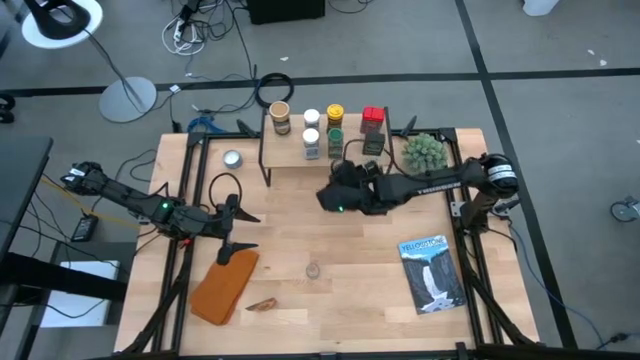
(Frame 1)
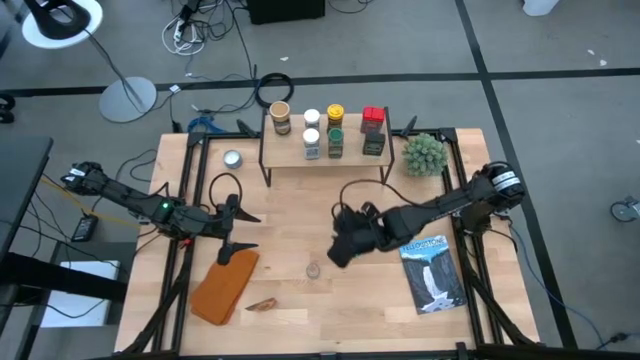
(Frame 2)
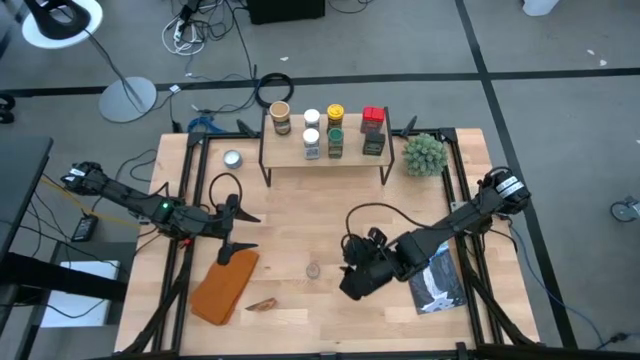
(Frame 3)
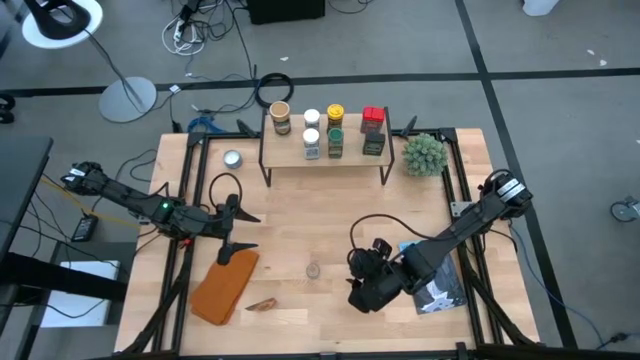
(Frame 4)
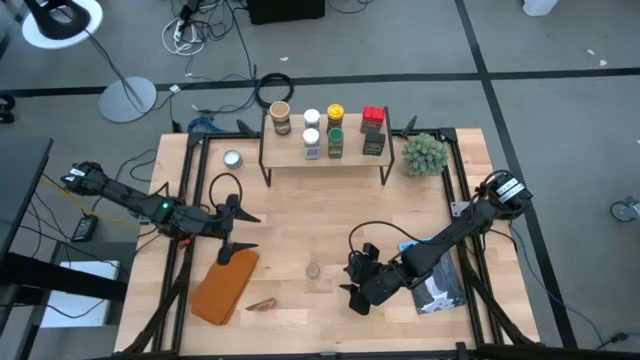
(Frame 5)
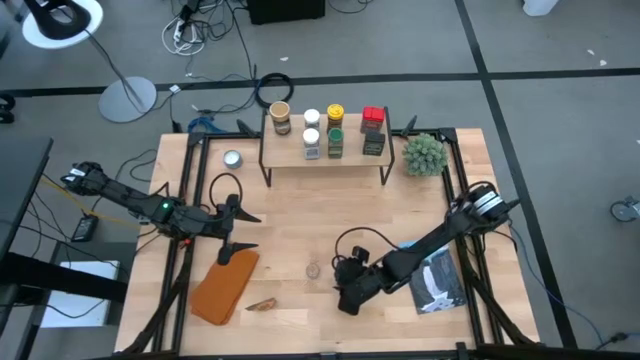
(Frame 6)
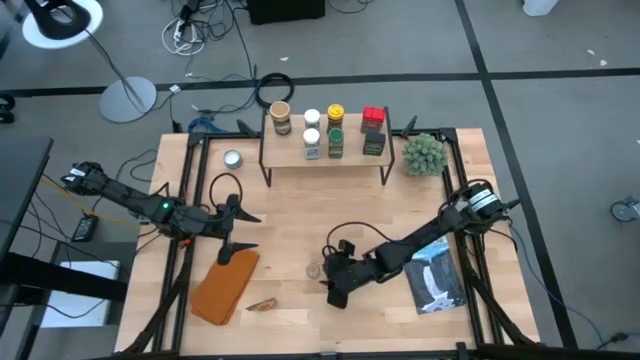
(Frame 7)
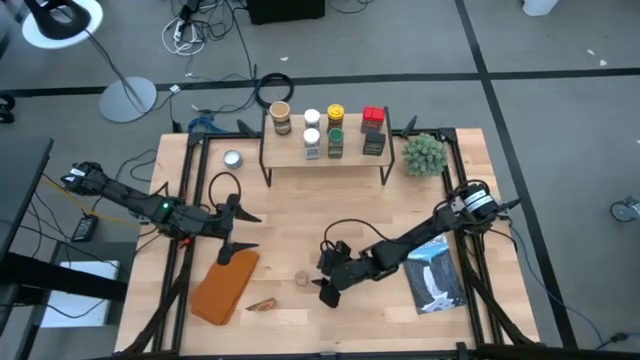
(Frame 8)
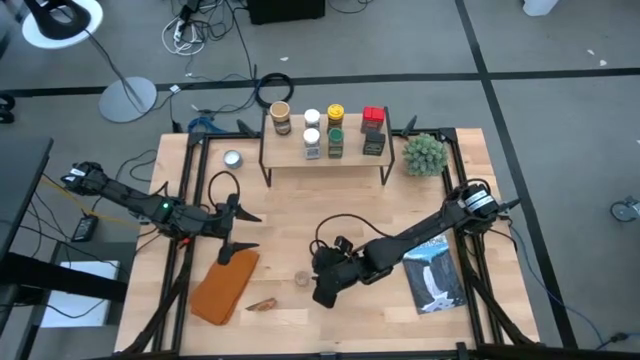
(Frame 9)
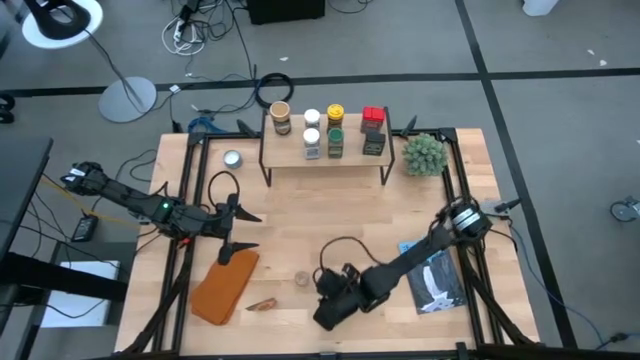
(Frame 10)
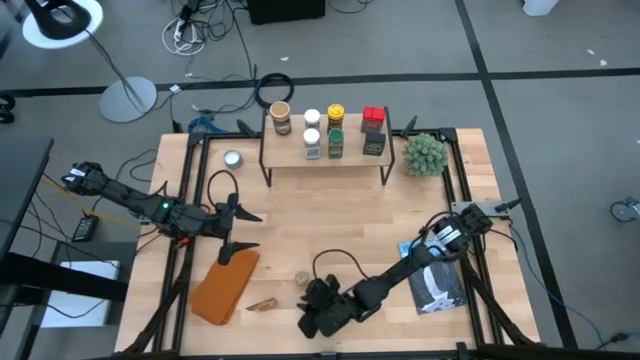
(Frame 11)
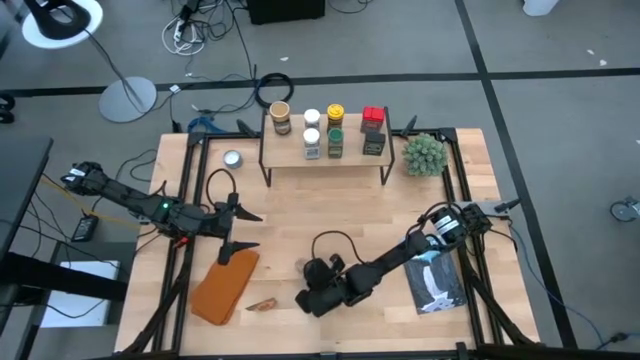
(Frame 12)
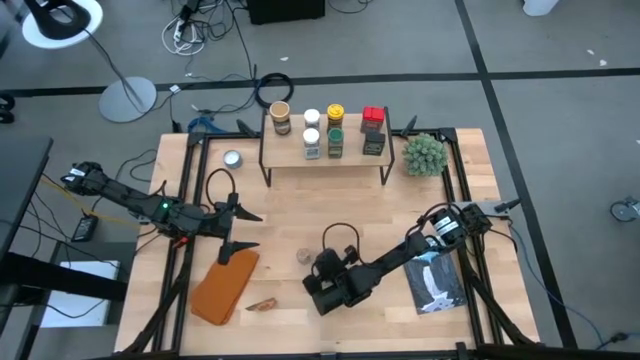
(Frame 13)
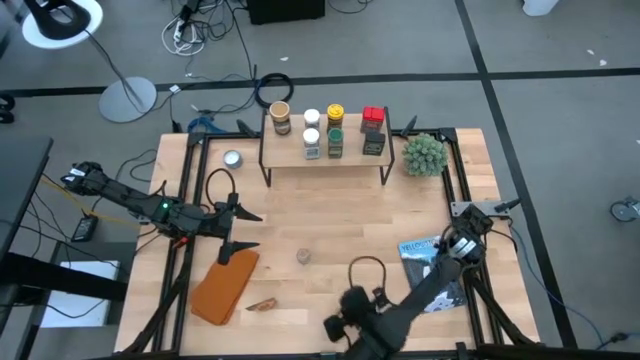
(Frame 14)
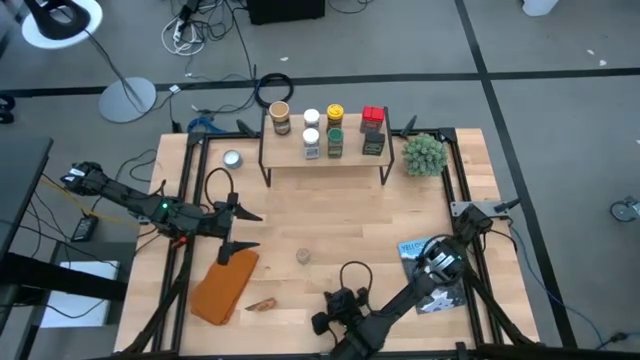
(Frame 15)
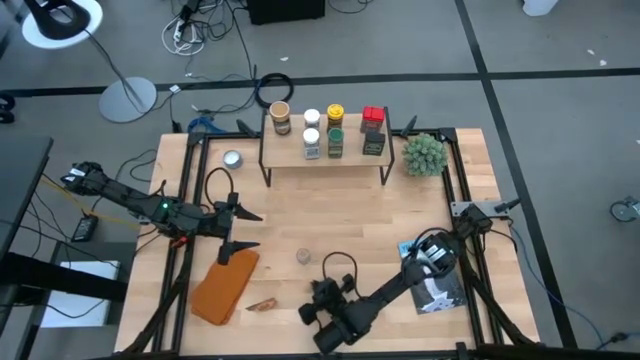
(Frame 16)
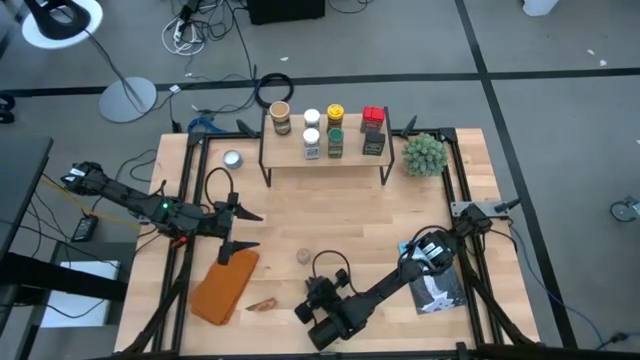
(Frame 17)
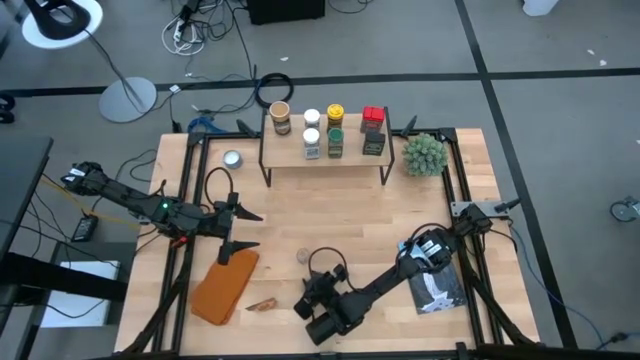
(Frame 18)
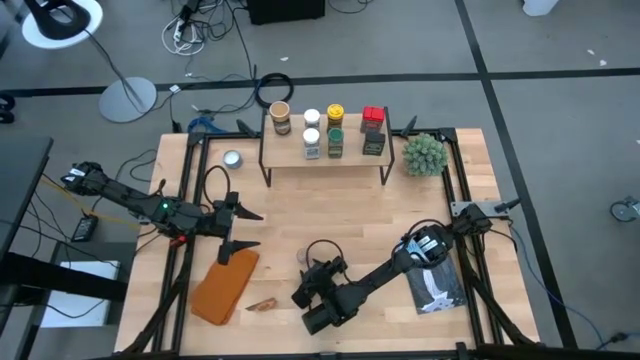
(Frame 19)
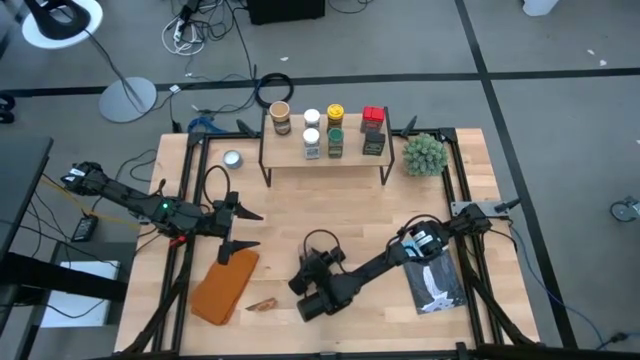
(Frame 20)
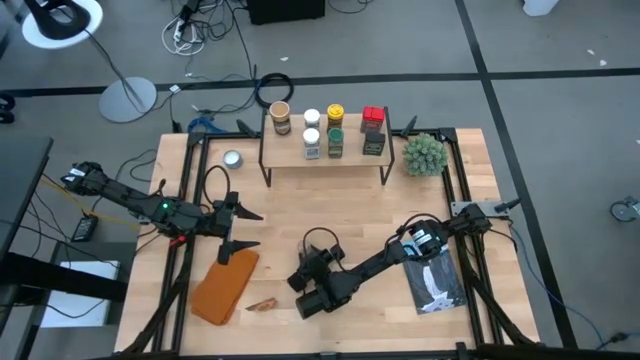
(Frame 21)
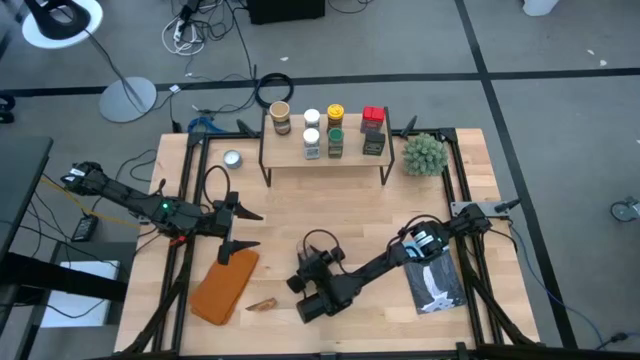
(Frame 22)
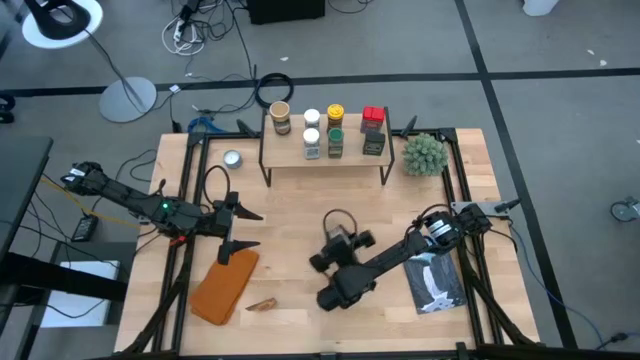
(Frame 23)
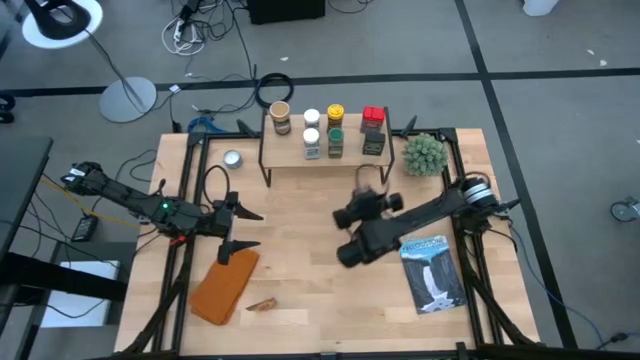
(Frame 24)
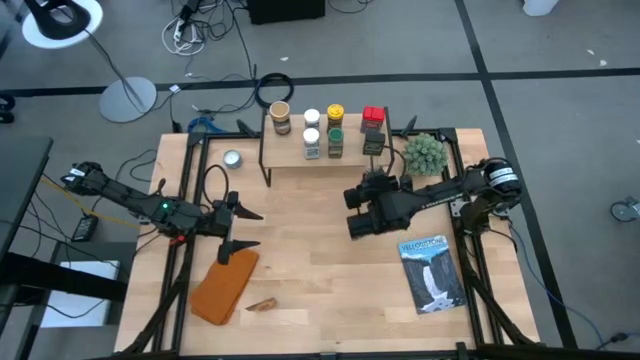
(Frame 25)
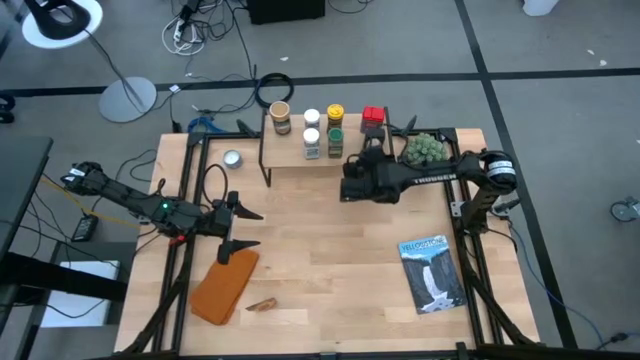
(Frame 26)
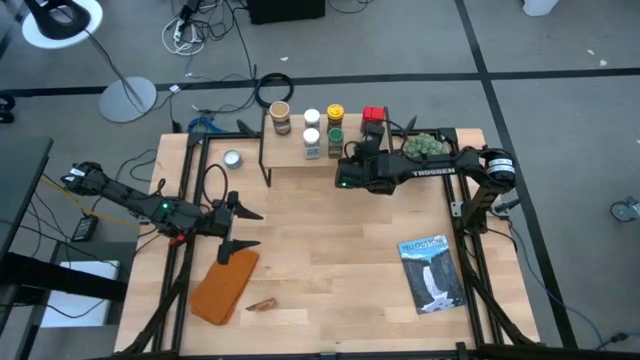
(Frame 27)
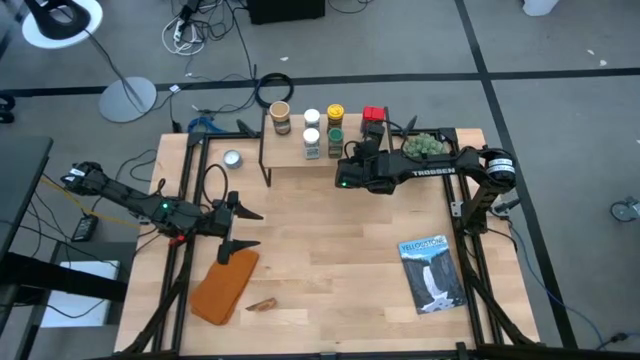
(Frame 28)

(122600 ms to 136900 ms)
Task: Shelf spices
Put the brown seasoning bottle on the shelf

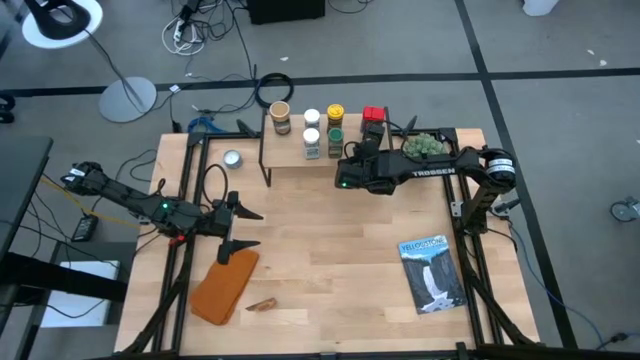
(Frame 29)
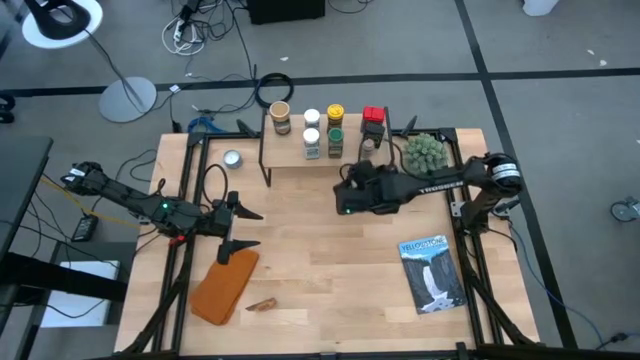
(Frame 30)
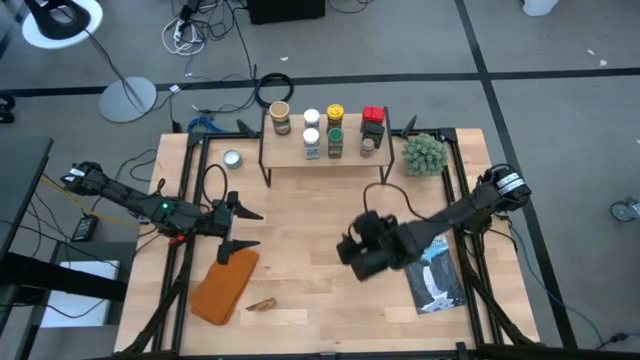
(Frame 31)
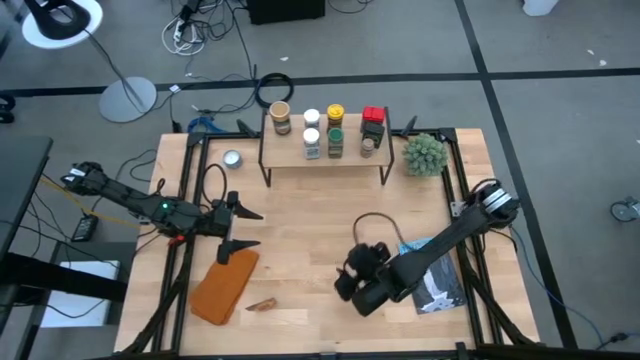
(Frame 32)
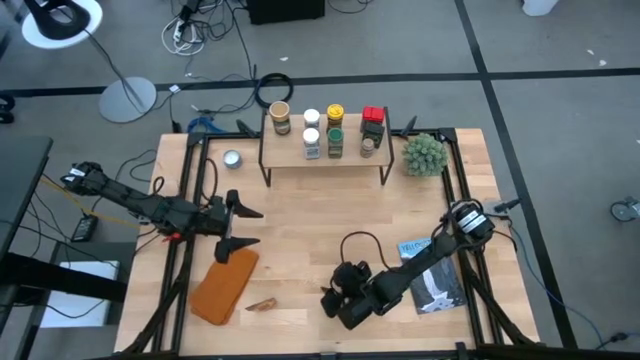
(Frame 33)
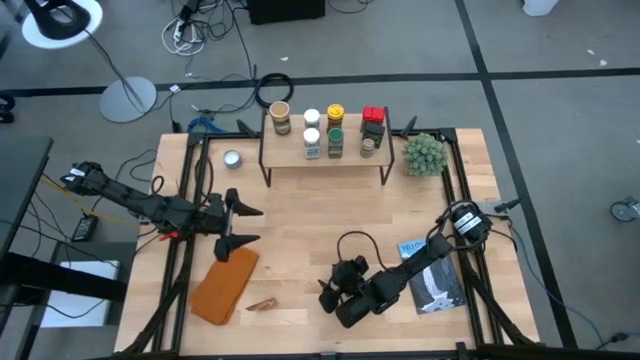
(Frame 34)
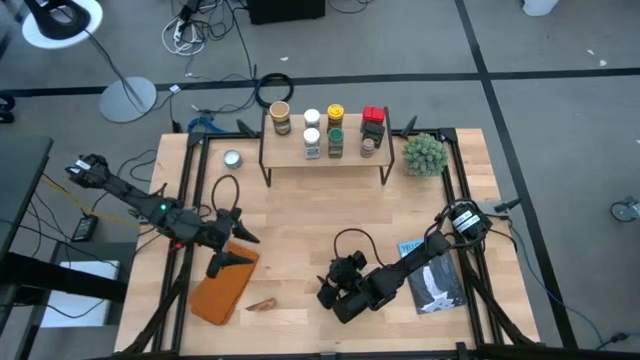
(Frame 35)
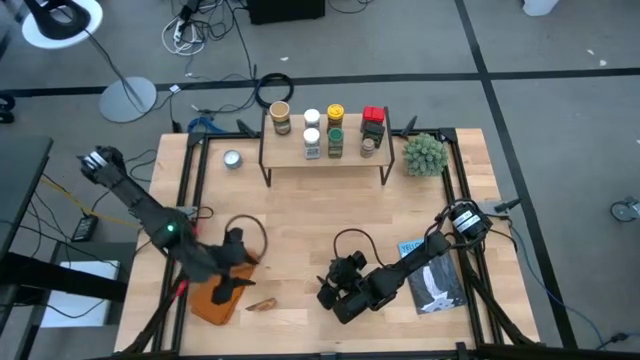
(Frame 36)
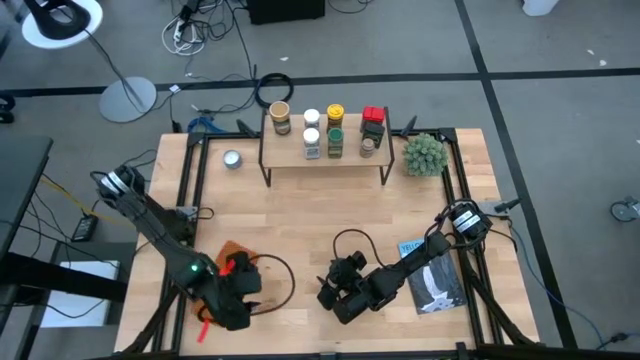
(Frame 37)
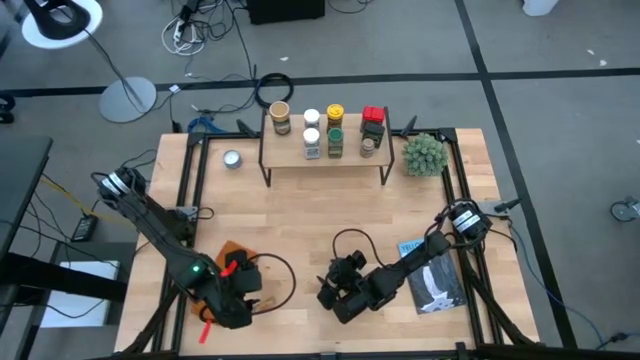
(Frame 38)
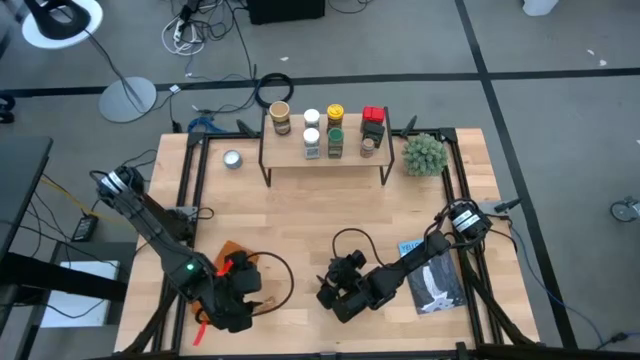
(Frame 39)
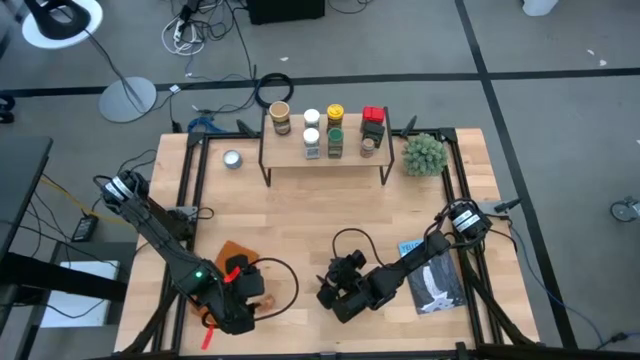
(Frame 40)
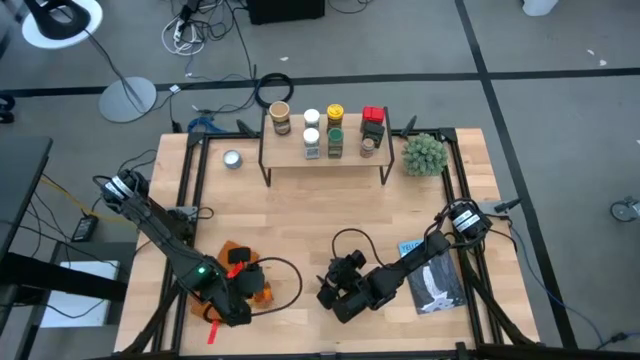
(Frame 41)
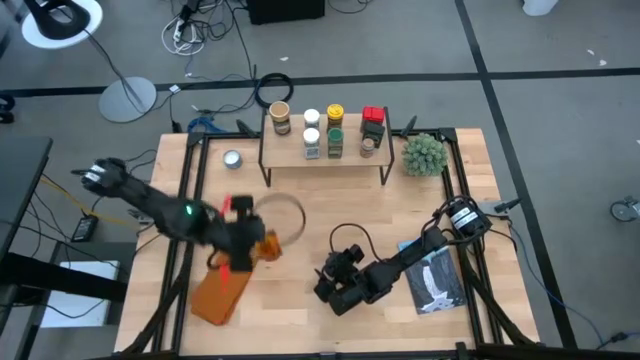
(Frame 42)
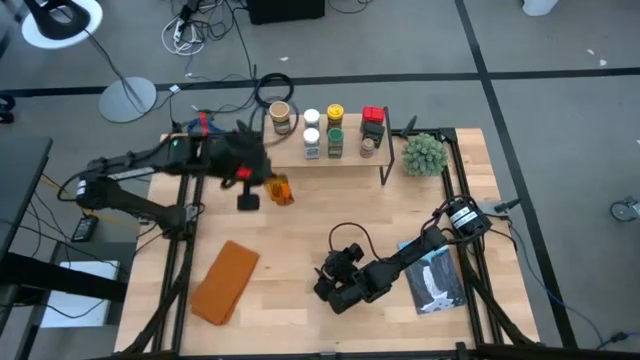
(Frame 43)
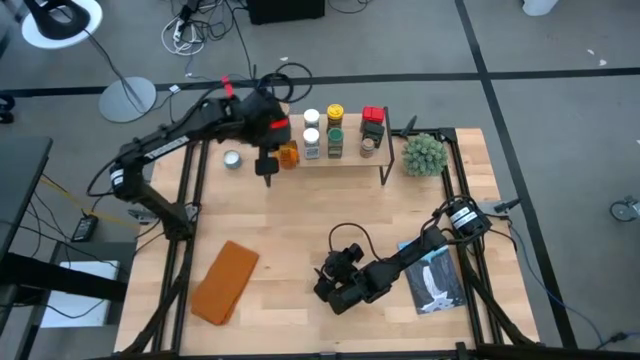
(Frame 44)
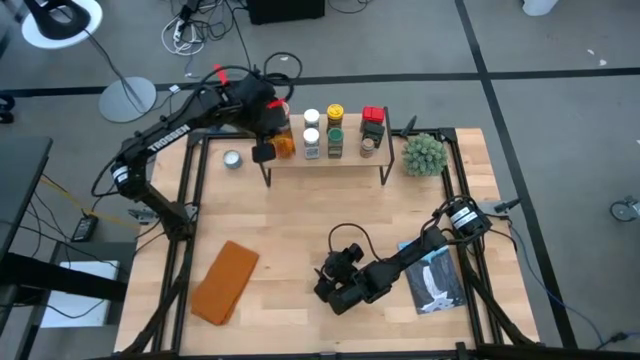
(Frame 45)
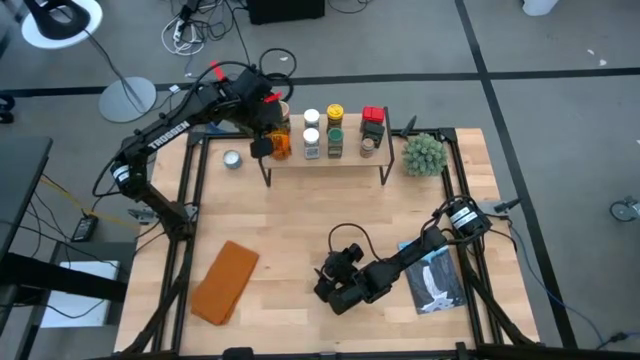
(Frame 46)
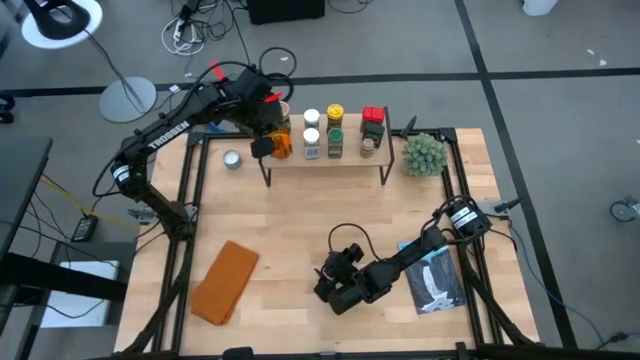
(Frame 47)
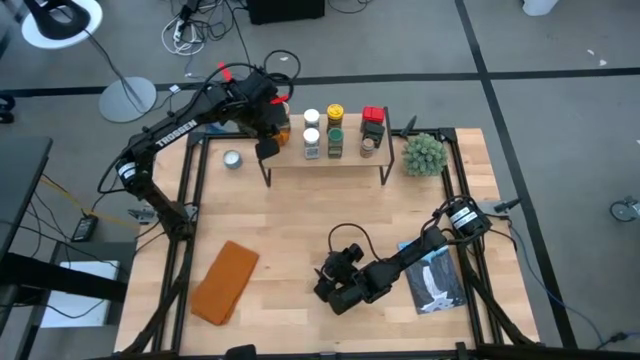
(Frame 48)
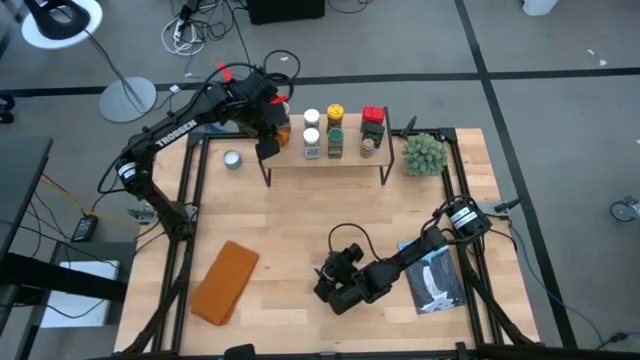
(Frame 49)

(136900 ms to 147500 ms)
Put the orange seasoning bag on the shelf
